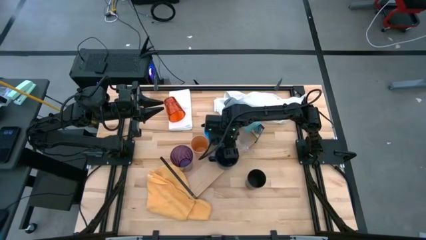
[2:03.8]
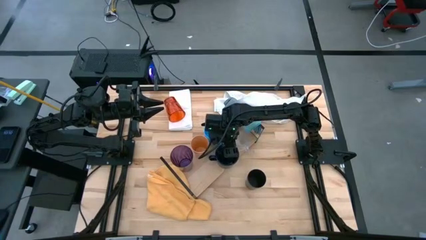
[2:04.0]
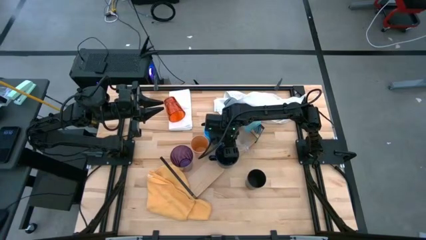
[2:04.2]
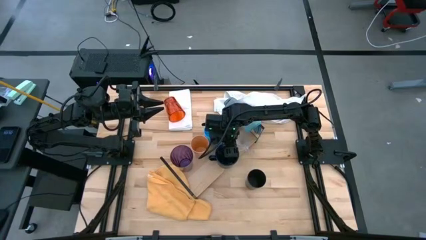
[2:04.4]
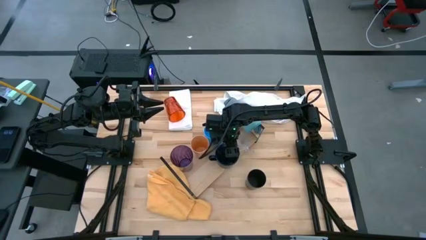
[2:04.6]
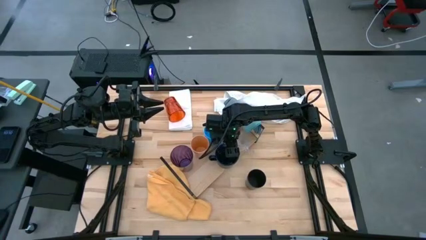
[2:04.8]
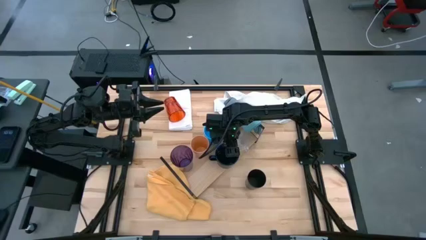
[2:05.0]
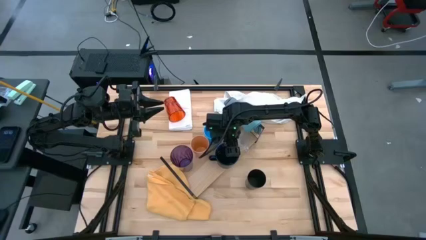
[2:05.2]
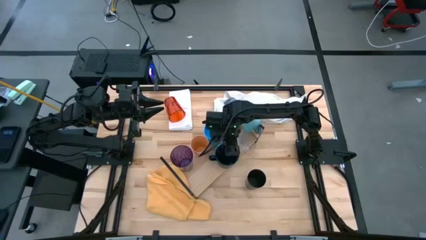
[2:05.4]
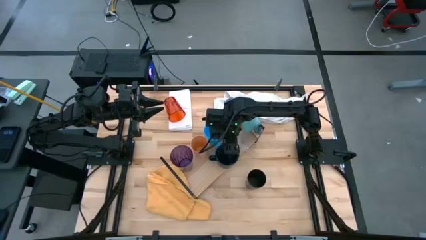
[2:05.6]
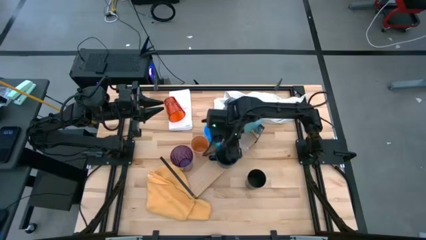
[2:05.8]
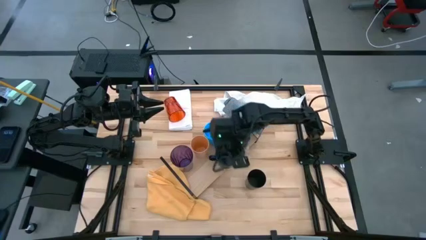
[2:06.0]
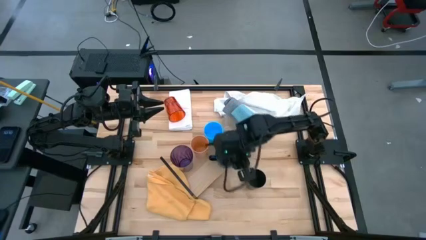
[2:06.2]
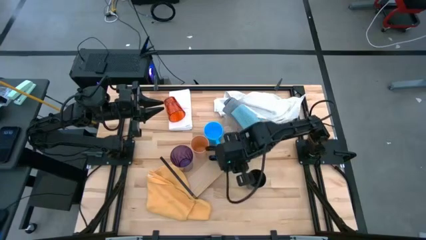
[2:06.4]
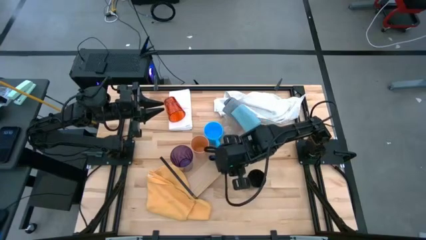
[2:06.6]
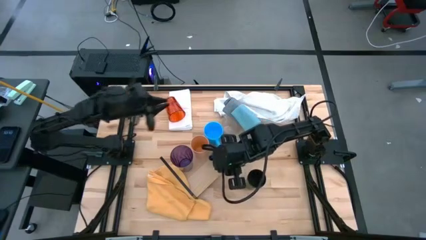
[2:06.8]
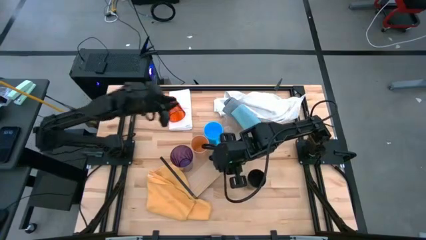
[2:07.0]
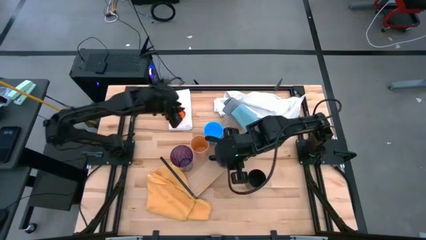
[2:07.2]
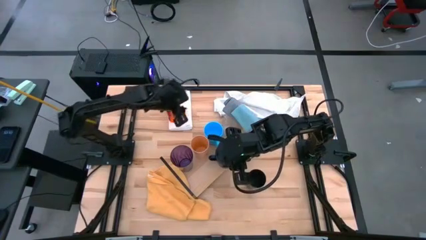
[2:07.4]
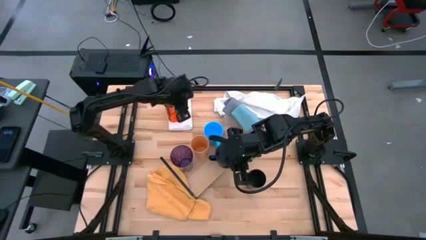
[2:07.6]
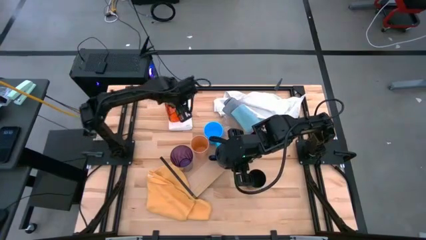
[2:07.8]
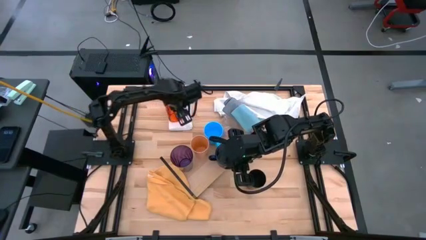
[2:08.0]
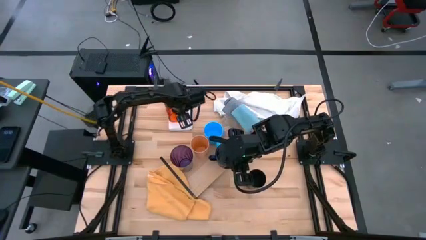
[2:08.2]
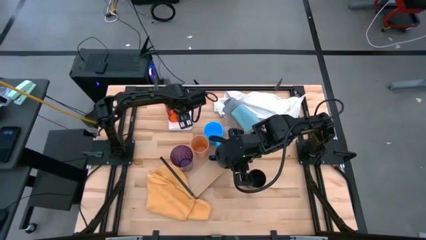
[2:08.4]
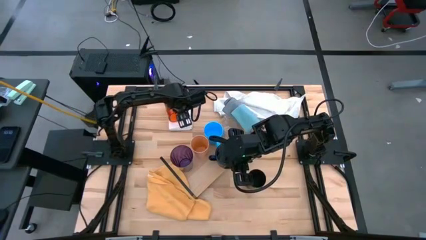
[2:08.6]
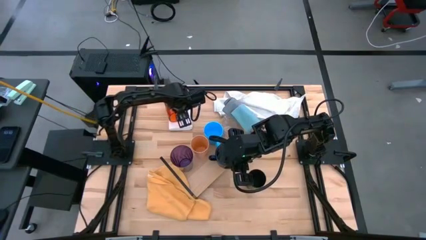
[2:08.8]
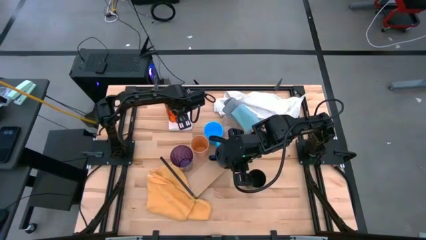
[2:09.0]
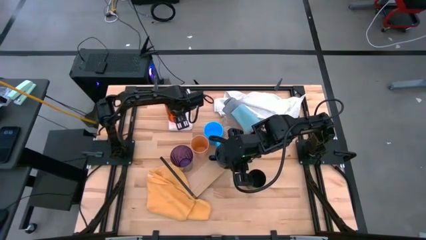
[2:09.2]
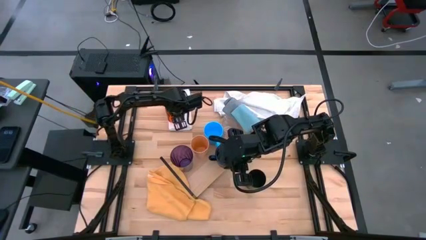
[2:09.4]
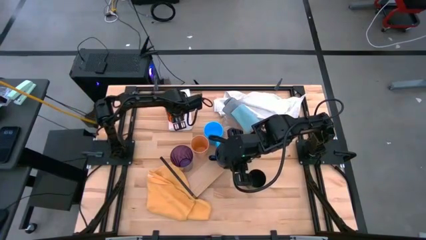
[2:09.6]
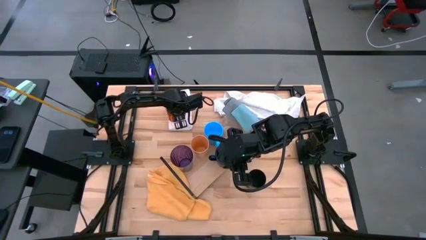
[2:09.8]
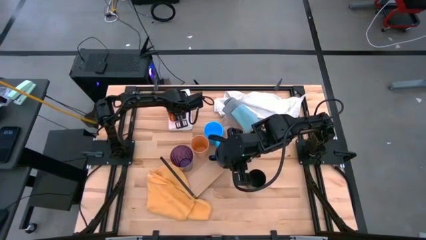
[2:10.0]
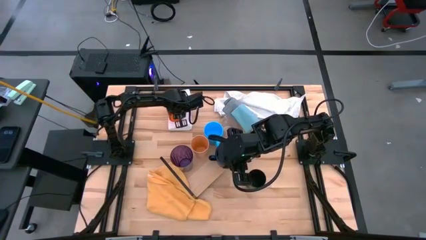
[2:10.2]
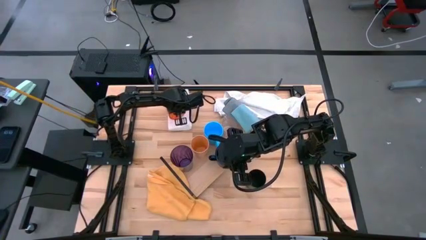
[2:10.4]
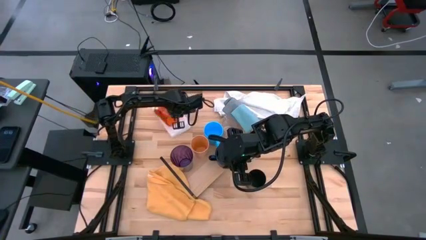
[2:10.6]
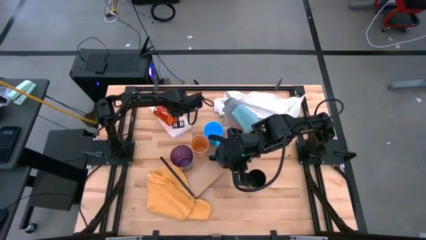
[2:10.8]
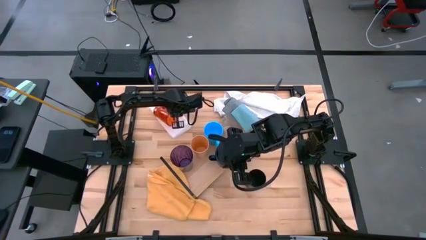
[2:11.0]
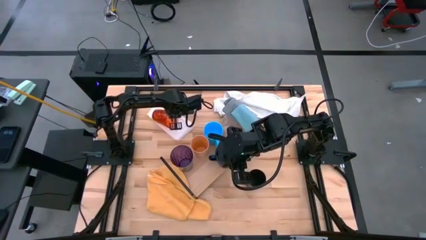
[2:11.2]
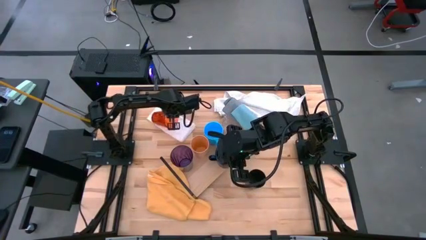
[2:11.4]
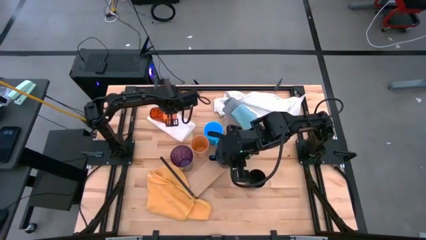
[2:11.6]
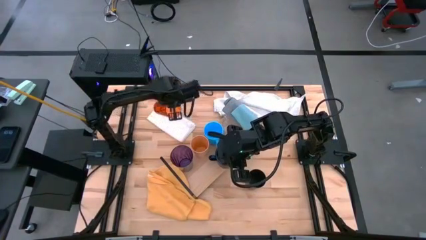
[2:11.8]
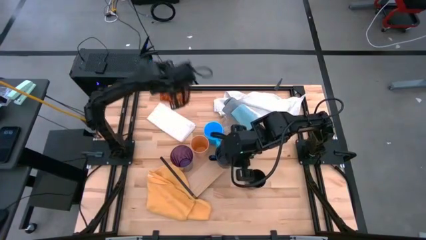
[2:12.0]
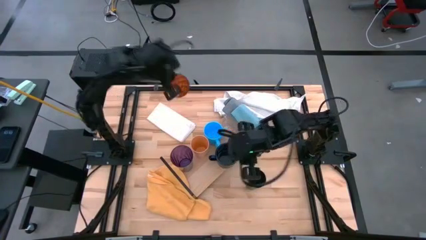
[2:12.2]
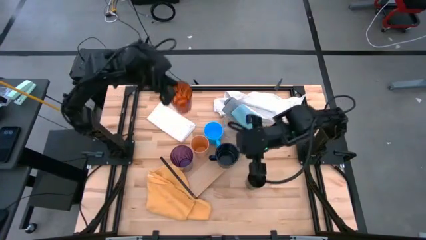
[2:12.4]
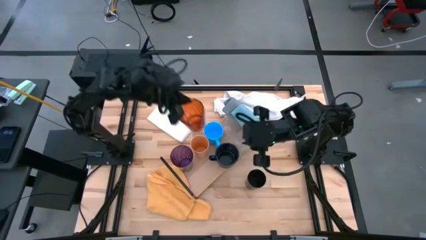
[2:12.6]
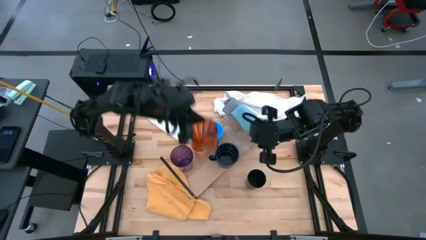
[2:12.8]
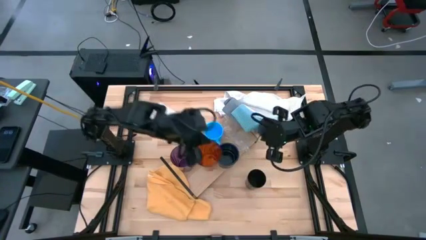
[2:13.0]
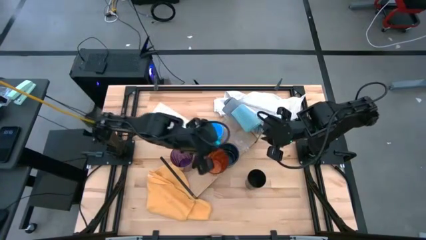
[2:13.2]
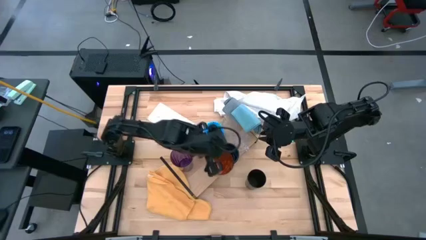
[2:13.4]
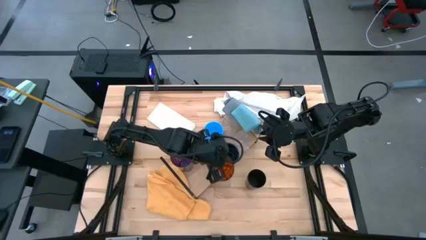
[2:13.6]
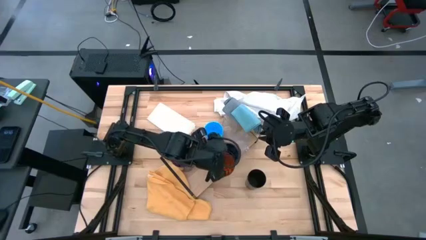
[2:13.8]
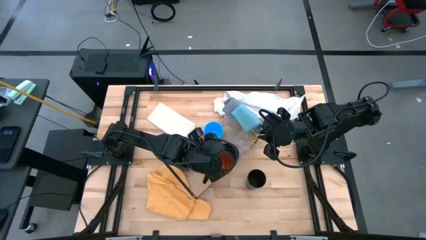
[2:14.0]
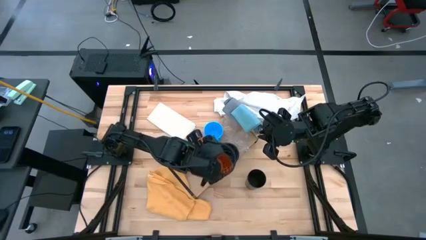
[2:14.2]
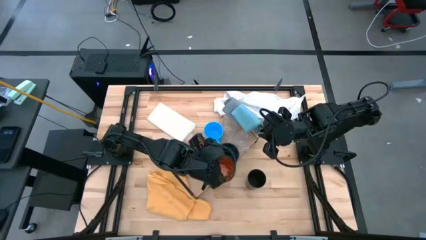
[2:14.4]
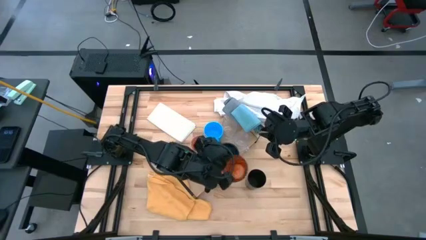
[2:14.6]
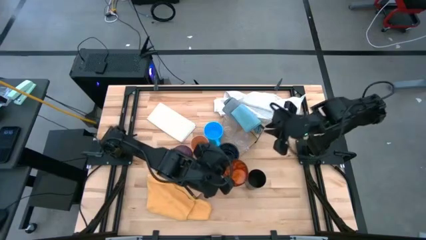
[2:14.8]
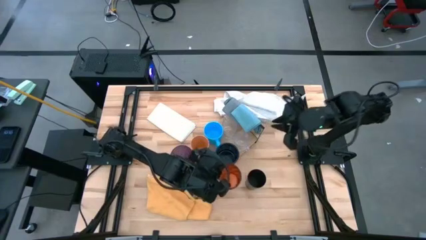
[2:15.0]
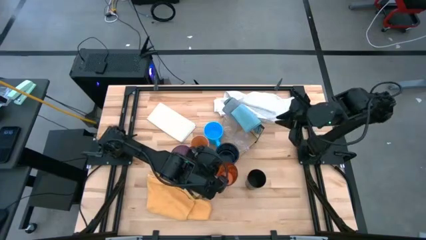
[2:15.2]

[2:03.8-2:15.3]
Task: Stack small to large cups/mugs on shelf
Put the orange glass on the shelf
